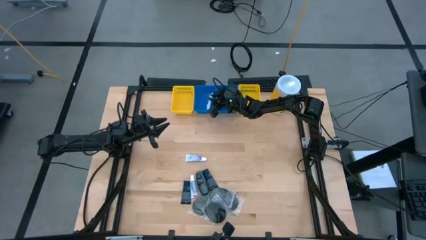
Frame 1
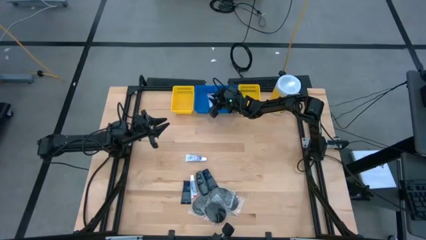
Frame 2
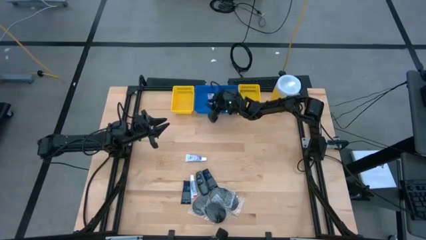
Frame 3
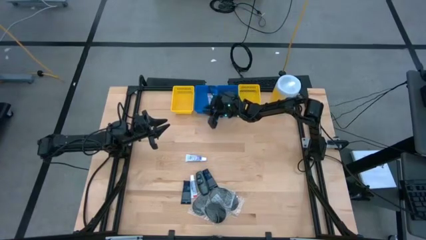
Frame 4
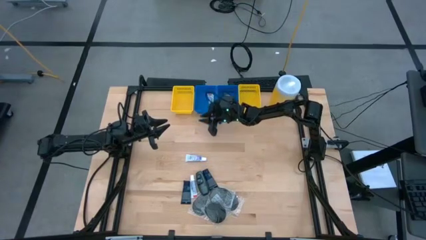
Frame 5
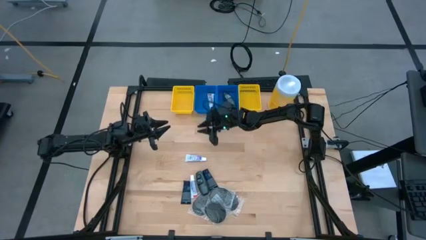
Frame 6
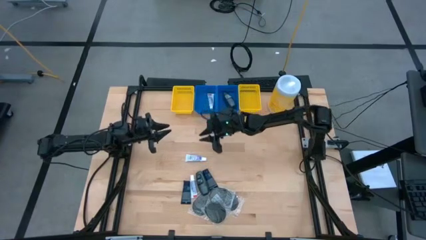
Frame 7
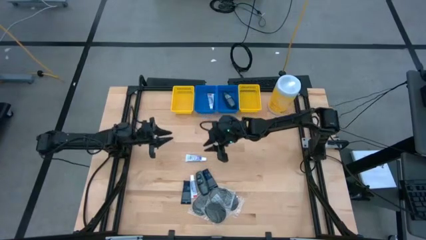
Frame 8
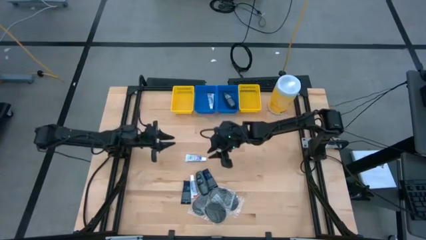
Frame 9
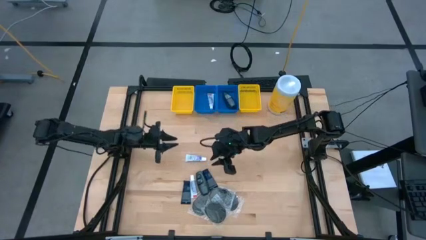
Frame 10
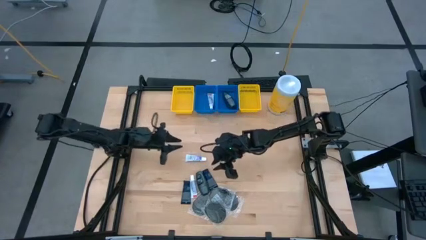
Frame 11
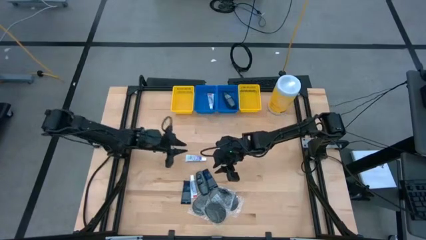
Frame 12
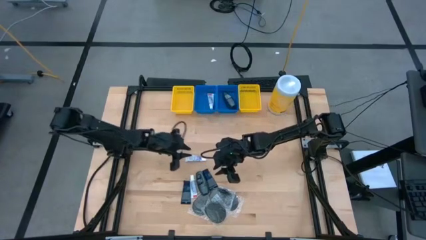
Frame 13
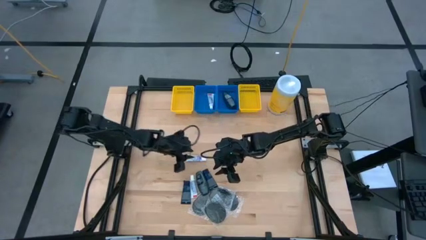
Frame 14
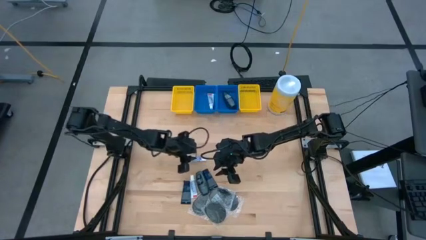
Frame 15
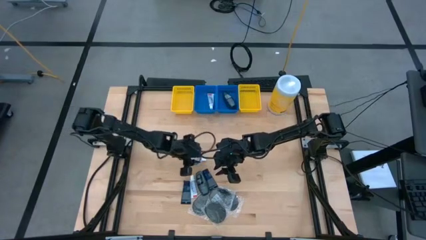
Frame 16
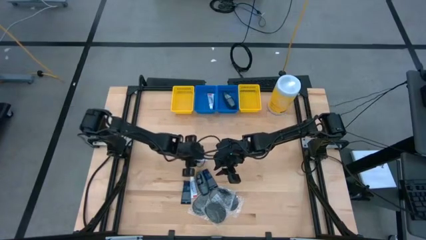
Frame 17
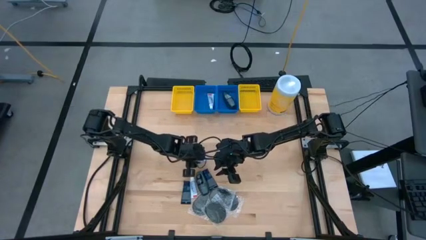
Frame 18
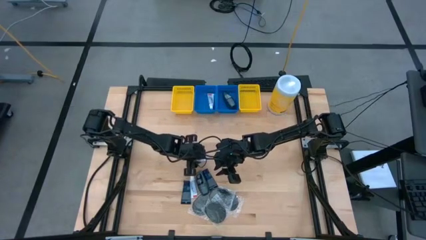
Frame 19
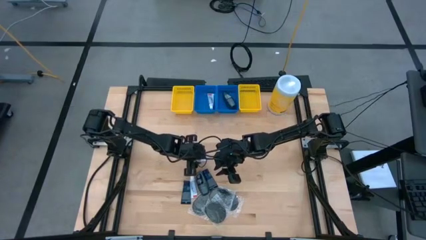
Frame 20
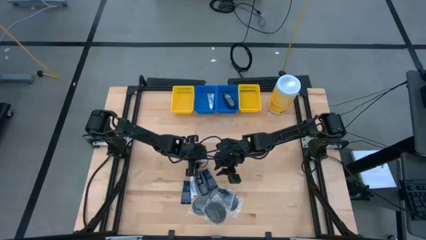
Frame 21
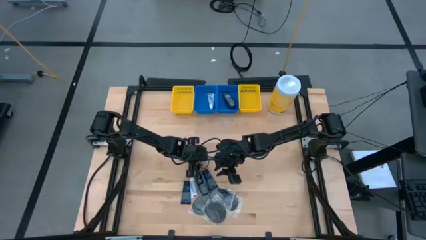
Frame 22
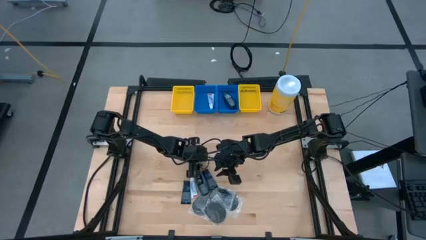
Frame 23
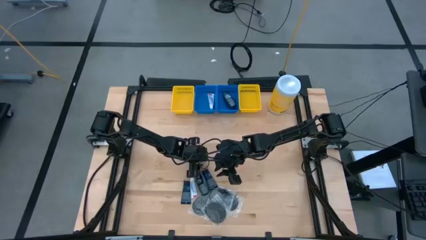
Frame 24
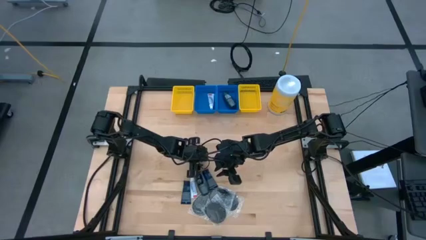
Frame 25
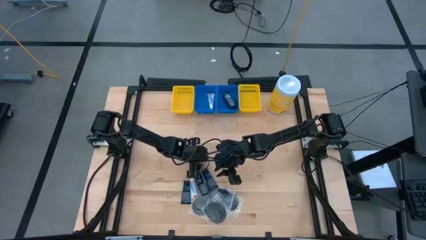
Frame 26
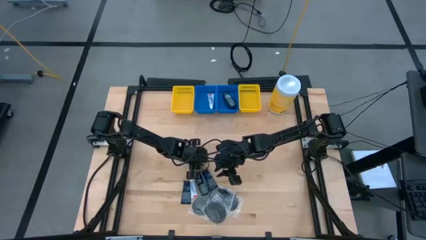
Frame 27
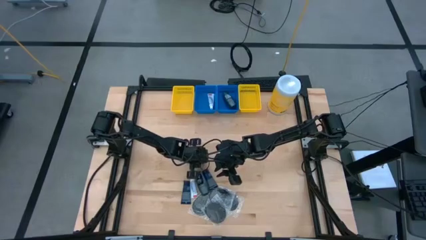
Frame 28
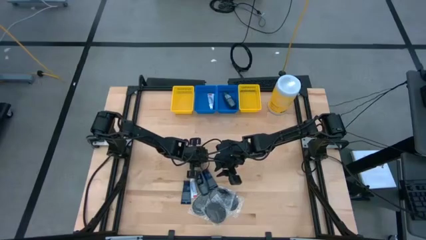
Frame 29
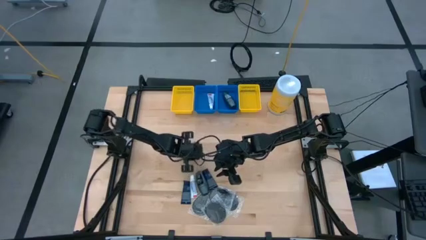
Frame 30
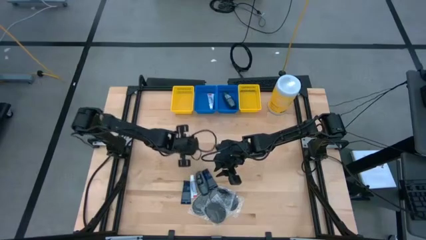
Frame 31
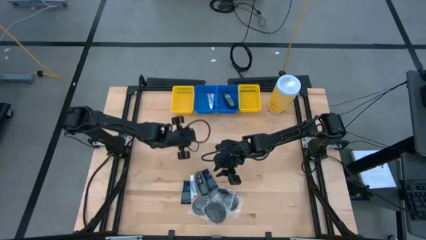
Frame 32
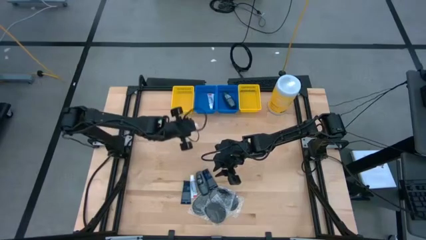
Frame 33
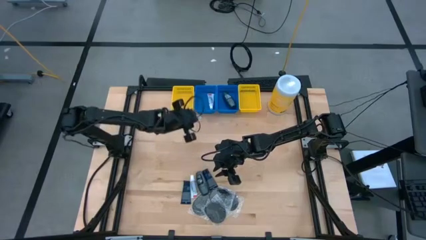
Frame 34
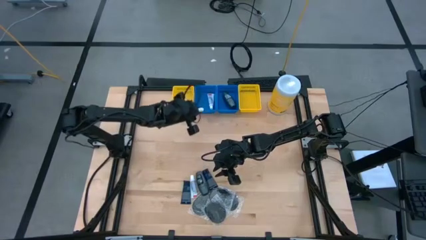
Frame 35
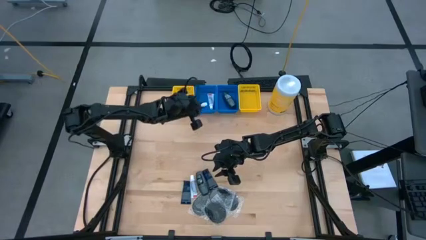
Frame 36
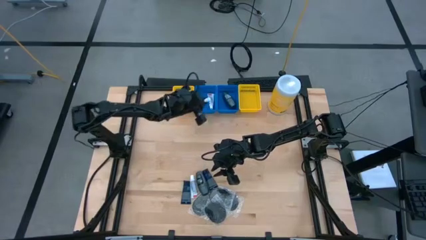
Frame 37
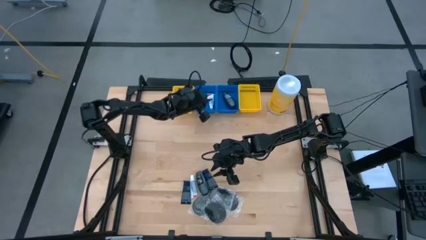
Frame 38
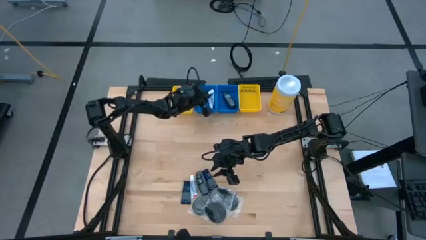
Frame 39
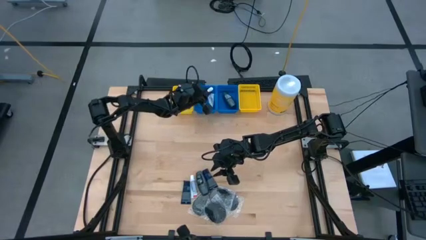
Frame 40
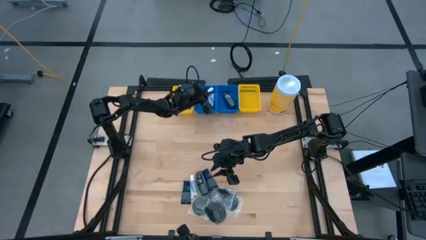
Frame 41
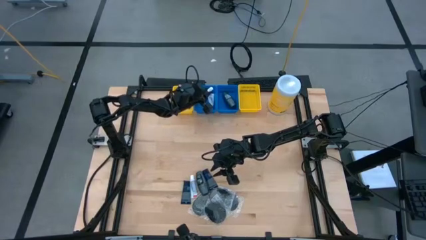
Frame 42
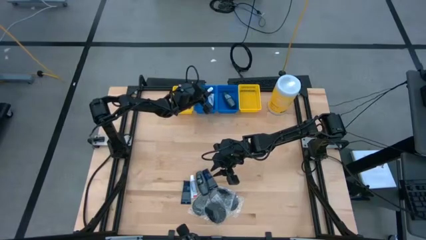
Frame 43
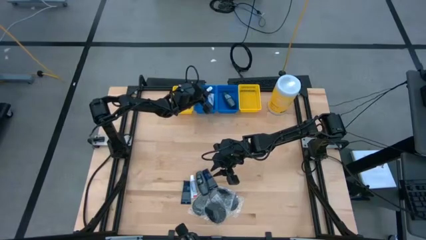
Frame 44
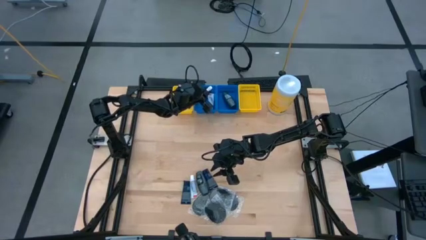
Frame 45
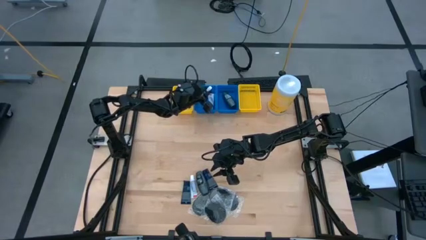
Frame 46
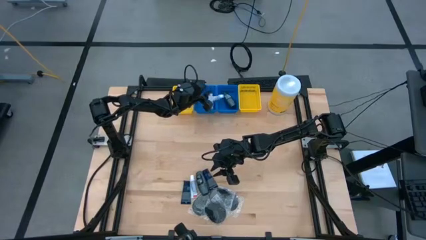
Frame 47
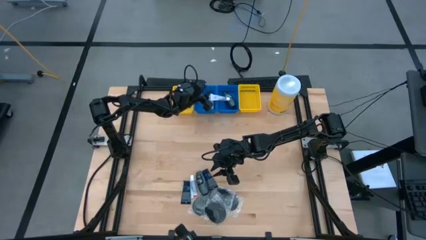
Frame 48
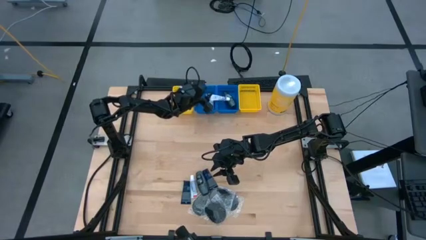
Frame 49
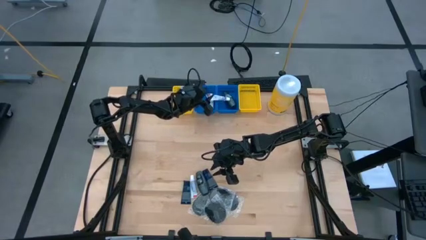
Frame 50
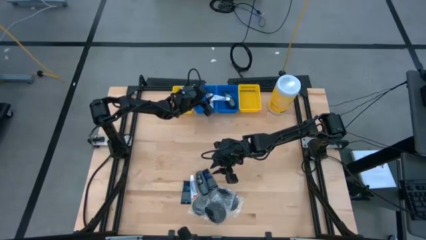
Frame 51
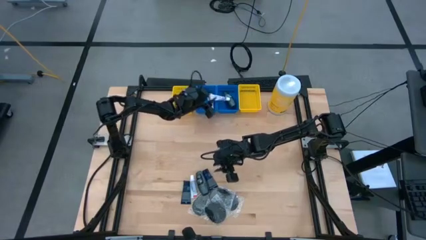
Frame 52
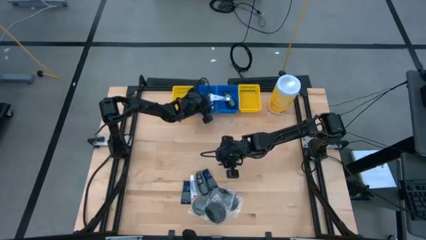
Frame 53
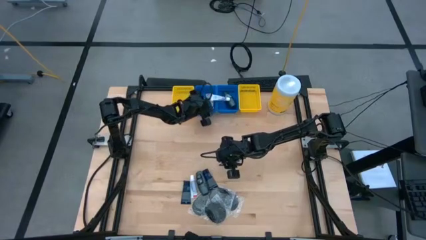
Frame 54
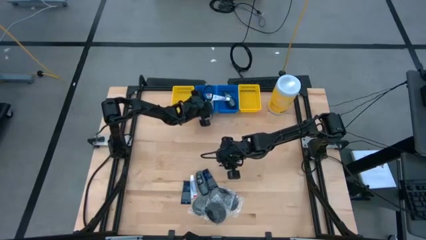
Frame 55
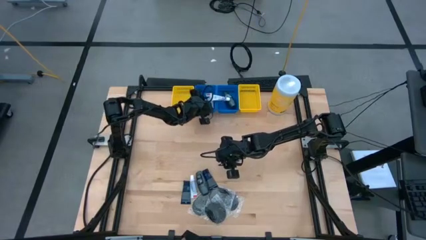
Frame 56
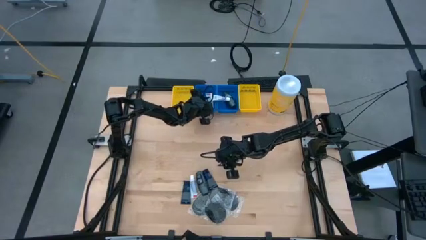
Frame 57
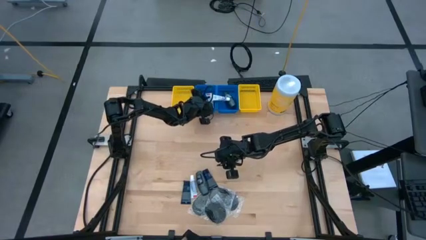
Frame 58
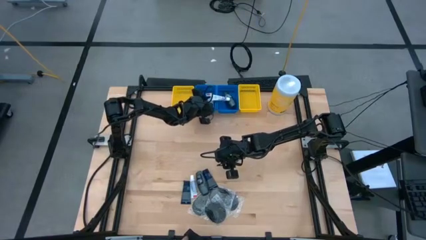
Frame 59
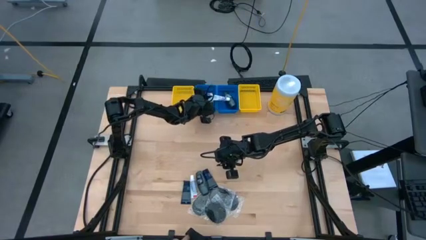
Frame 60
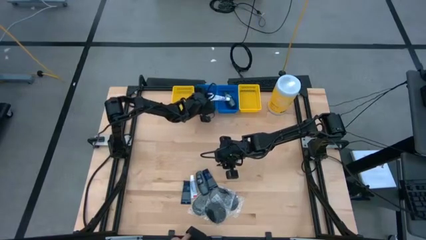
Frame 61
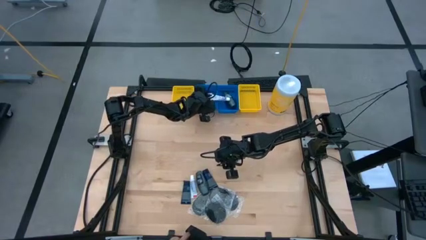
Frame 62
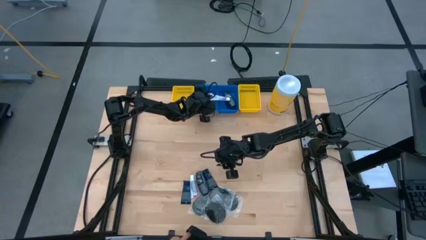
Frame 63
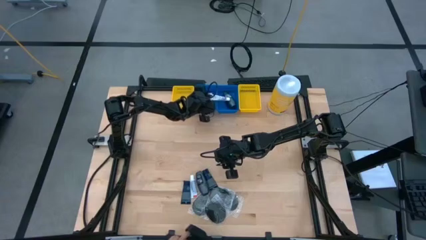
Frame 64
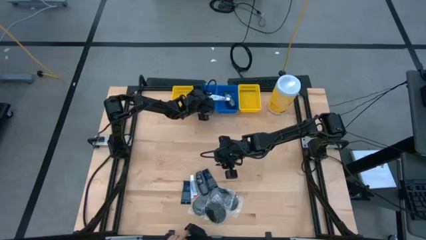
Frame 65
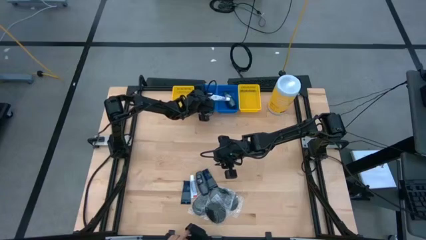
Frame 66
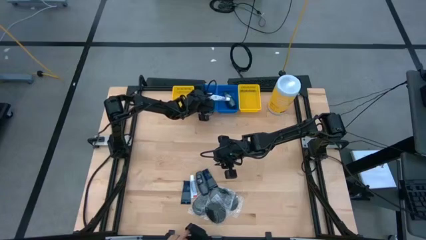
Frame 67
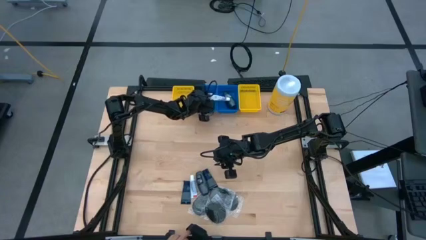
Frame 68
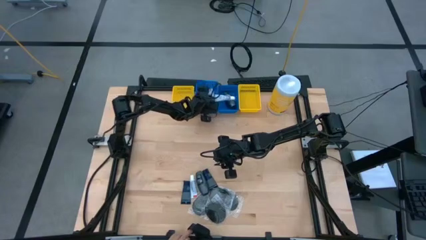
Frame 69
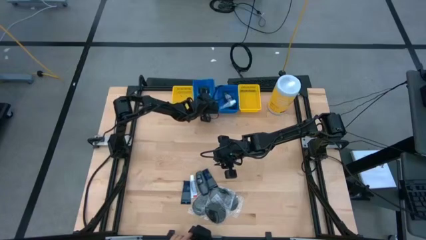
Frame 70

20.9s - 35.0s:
Task: Pick & Place Travel size toiletries
Put the white toothpaste into the left blue bin
